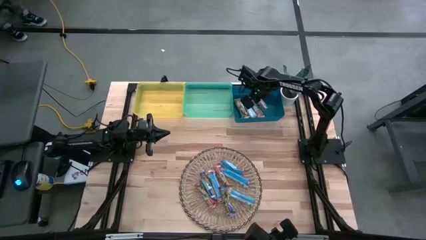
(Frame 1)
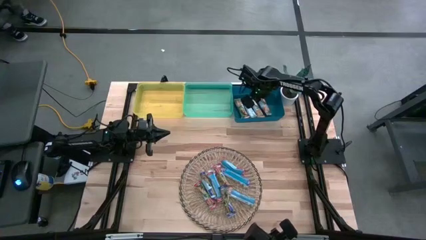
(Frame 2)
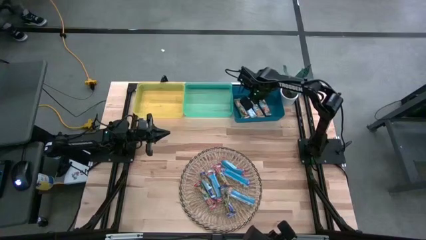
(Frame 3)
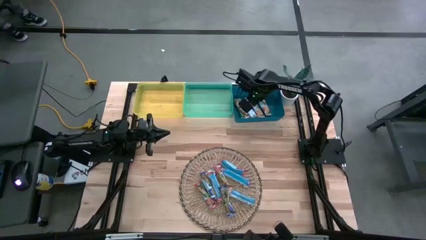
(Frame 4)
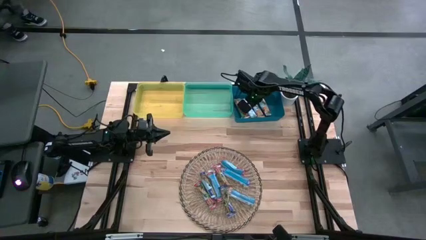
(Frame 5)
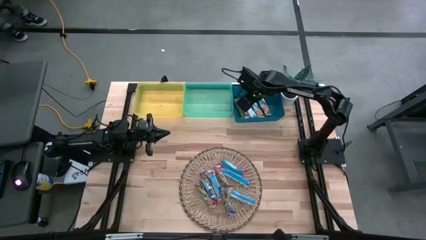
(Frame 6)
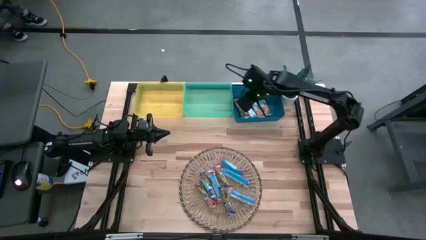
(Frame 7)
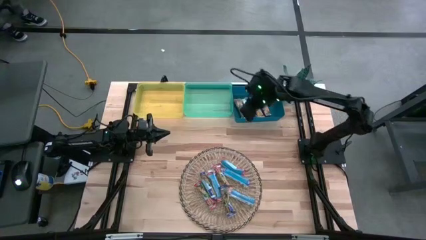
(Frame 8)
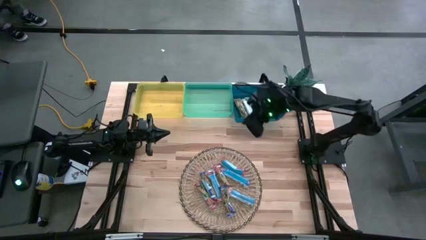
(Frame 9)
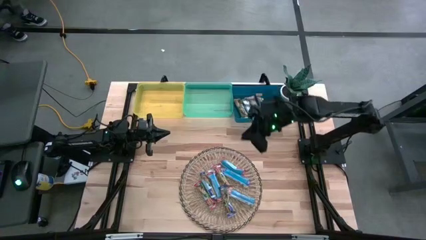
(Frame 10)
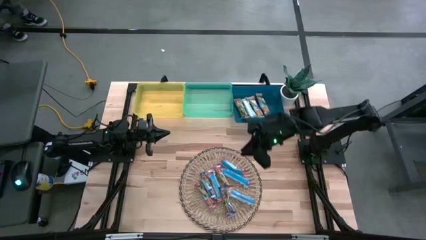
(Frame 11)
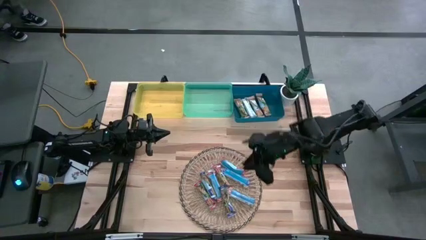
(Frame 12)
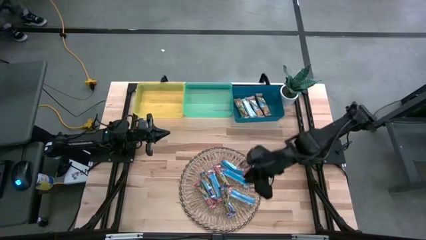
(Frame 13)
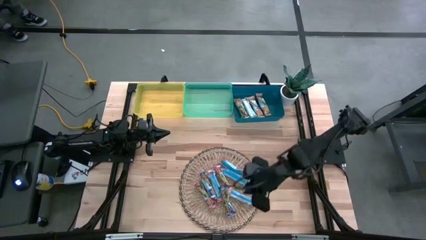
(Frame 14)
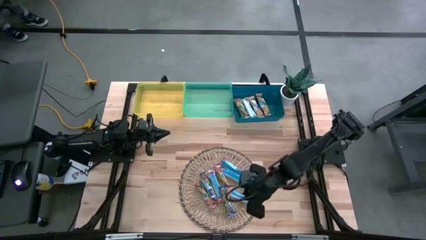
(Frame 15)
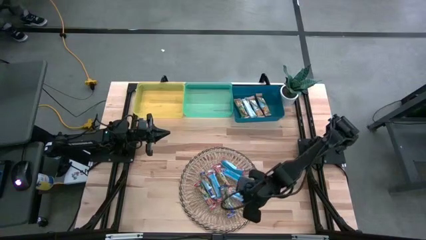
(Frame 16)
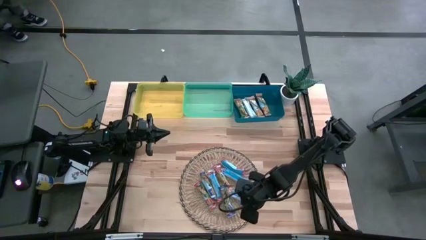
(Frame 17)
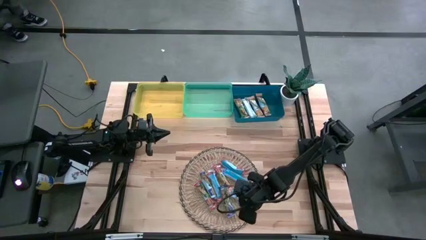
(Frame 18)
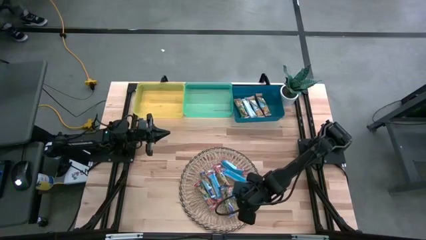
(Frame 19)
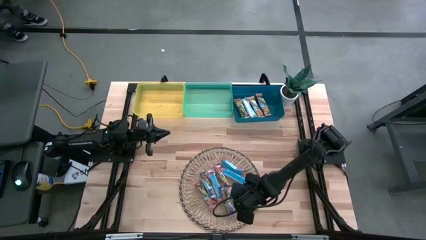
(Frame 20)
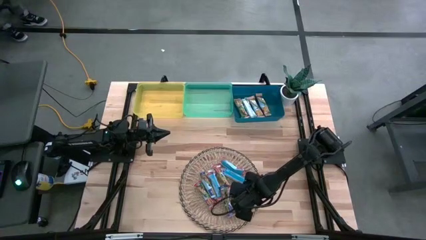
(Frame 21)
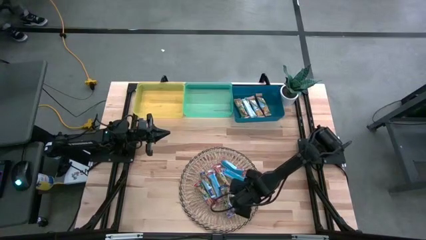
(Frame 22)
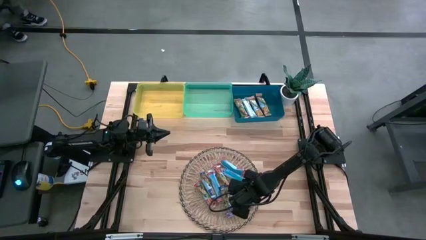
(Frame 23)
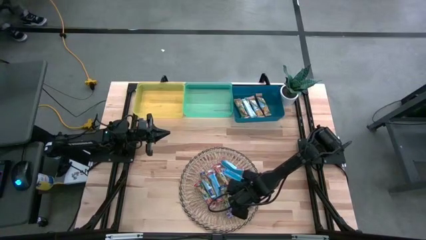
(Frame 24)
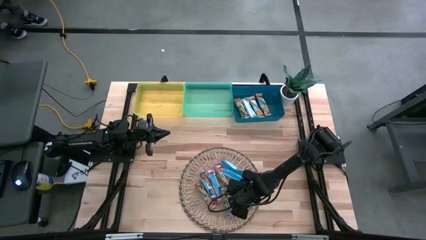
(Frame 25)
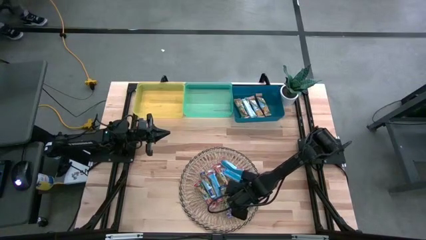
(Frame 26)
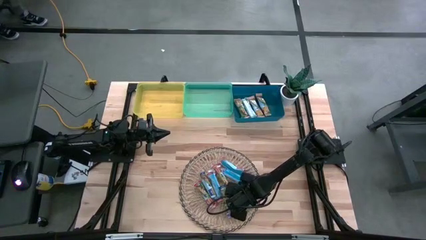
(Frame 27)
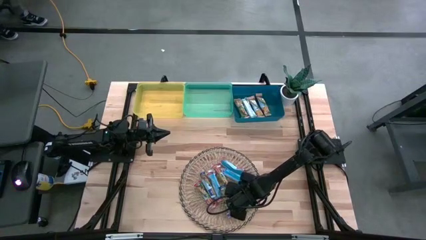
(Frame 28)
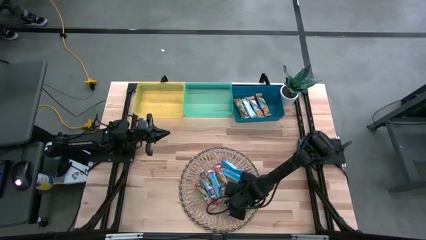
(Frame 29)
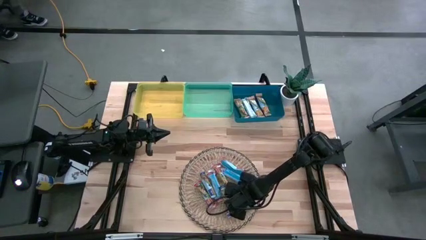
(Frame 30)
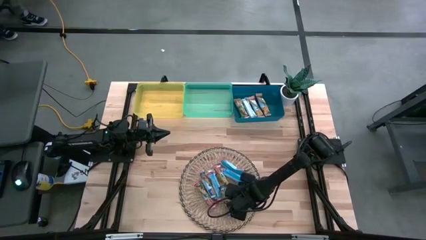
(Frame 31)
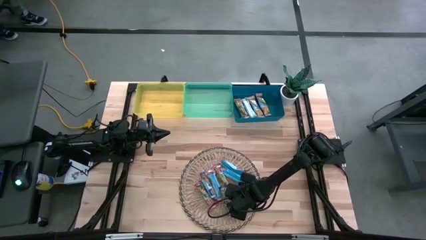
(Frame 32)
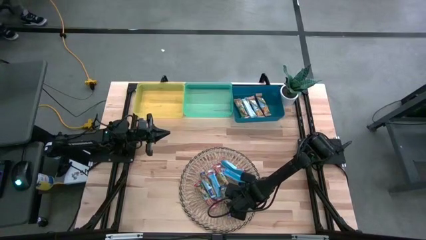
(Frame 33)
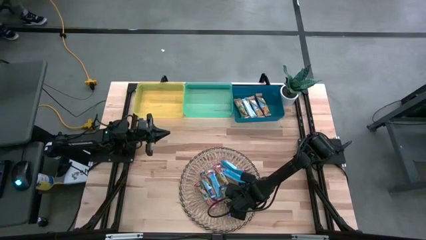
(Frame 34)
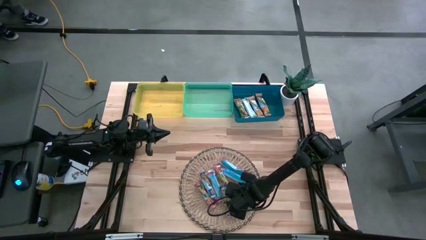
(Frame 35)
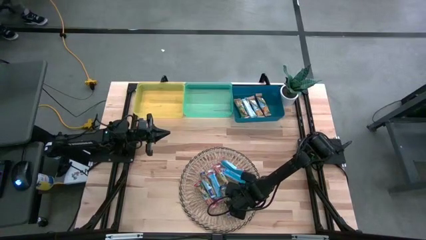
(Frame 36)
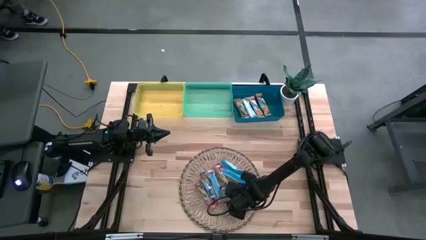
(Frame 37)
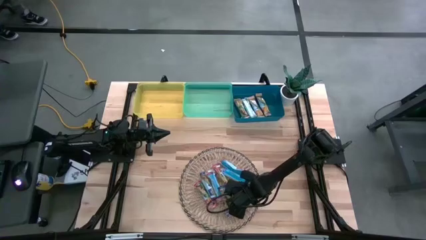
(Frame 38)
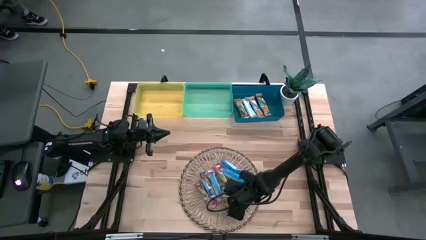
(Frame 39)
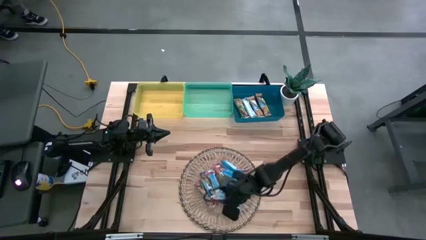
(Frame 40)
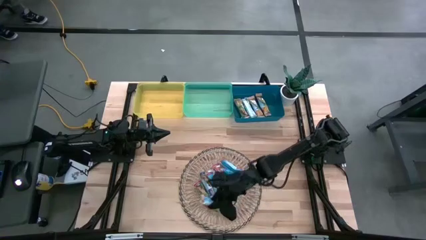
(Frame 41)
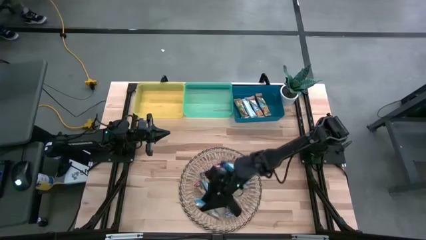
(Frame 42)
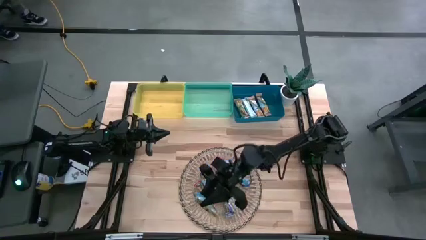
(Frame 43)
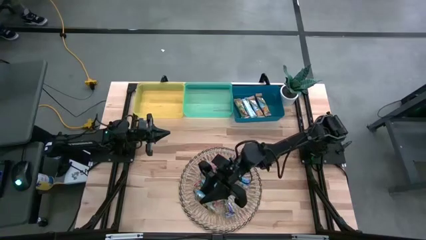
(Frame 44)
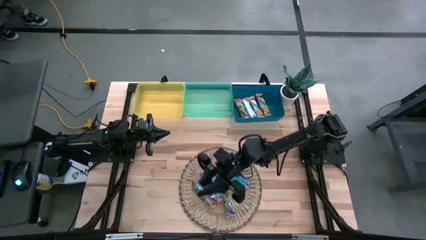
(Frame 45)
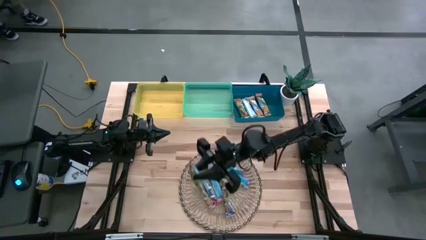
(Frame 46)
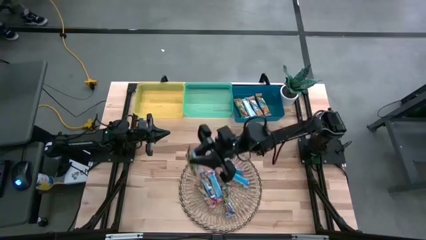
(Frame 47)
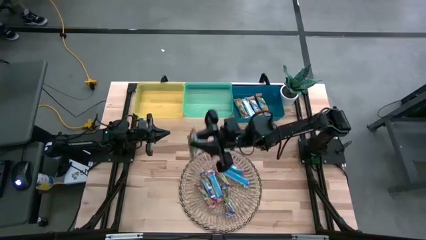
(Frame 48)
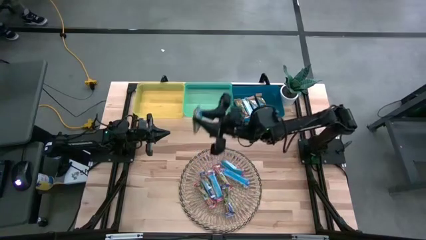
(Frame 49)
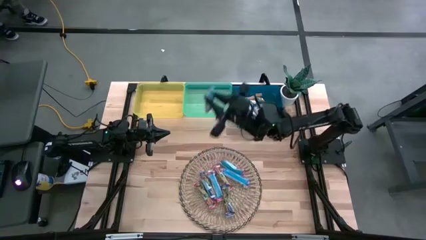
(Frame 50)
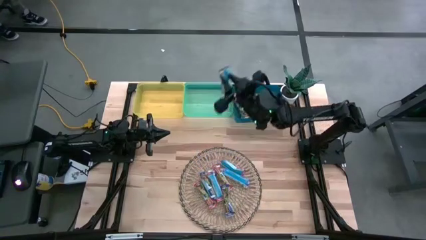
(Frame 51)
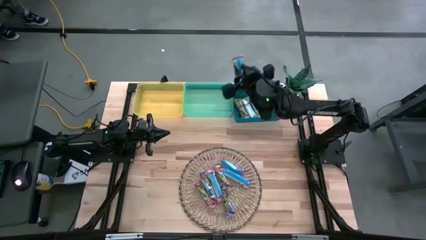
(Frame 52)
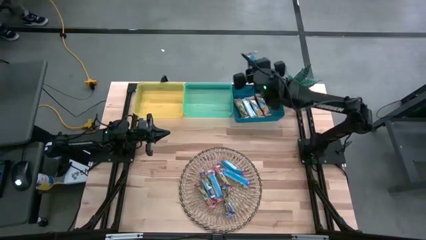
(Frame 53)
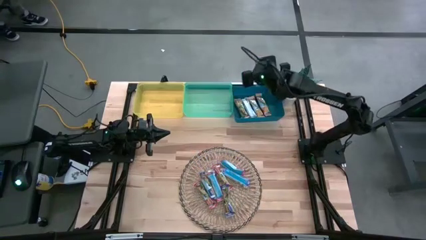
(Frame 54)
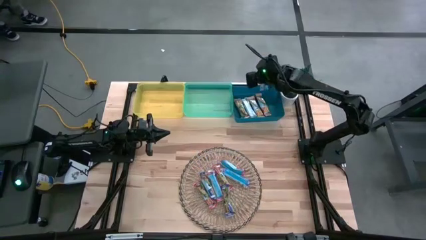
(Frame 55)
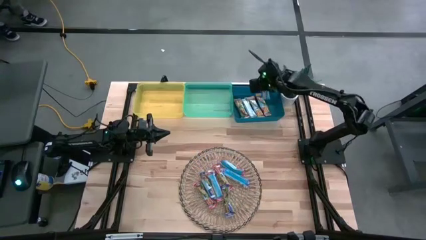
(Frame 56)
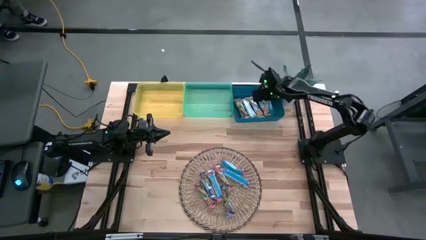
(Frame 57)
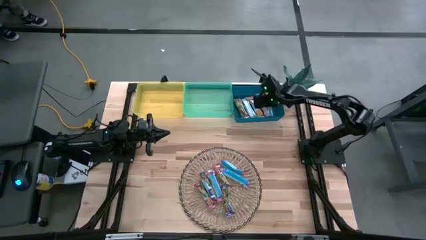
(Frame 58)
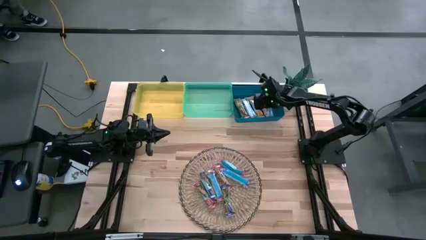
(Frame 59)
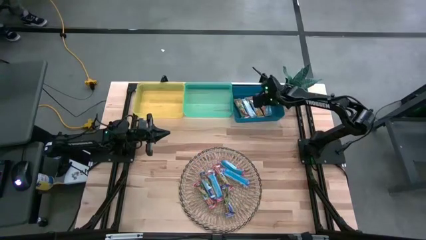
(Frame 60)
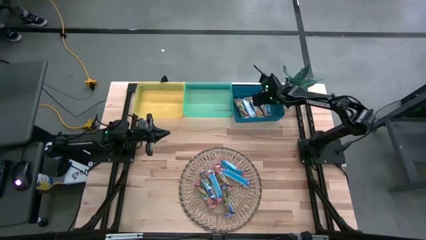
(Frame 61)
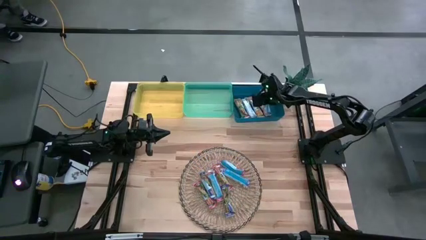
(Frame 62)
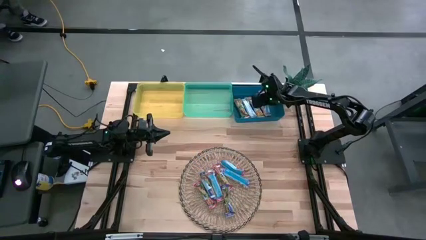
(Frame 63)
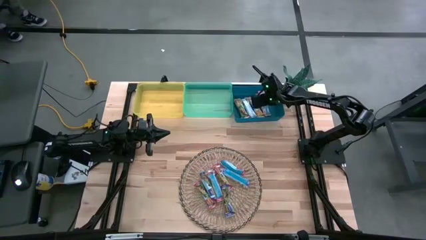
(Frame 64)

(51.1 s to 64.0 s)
Task: Pick and place Granola Bars by type
Put the orange granola bar into the blue bin
